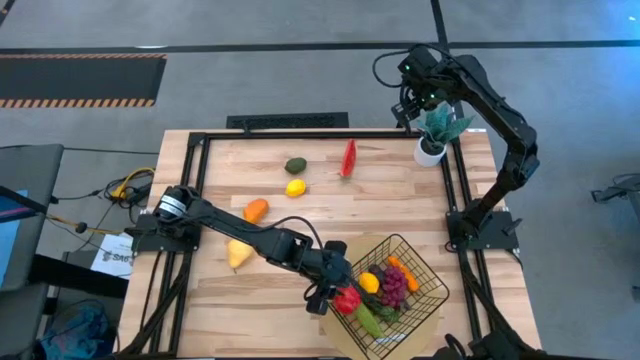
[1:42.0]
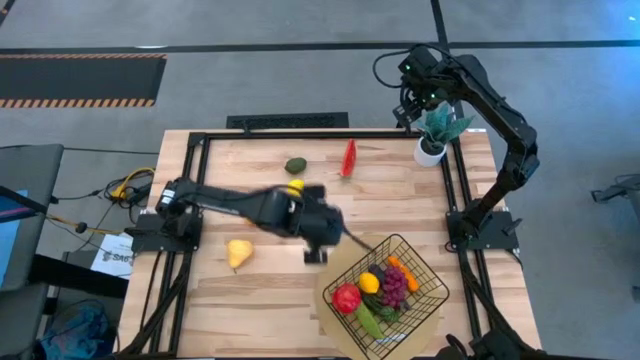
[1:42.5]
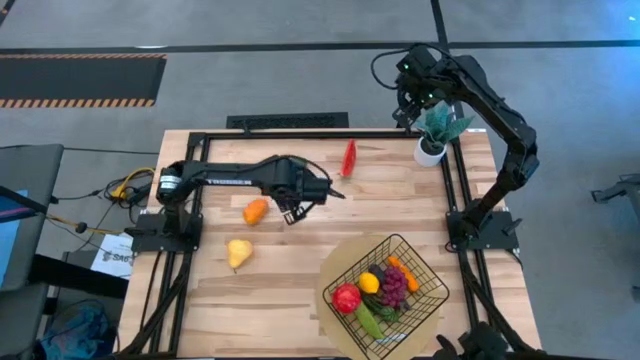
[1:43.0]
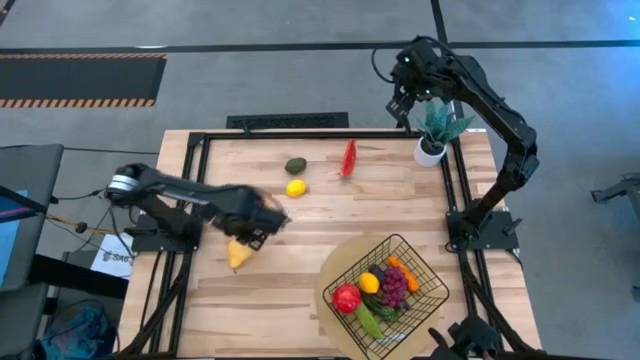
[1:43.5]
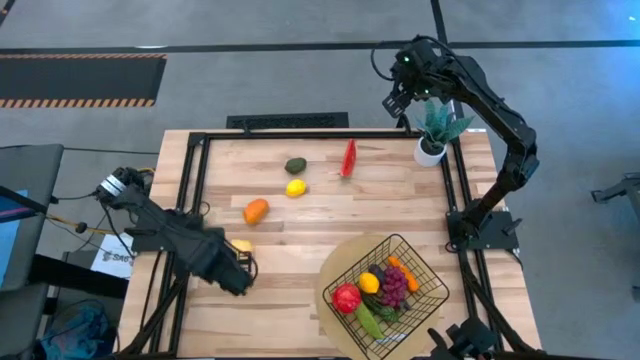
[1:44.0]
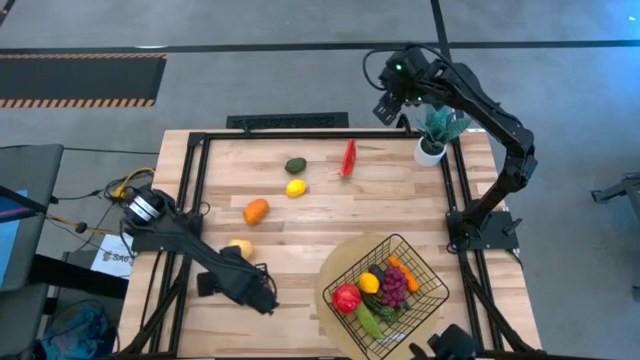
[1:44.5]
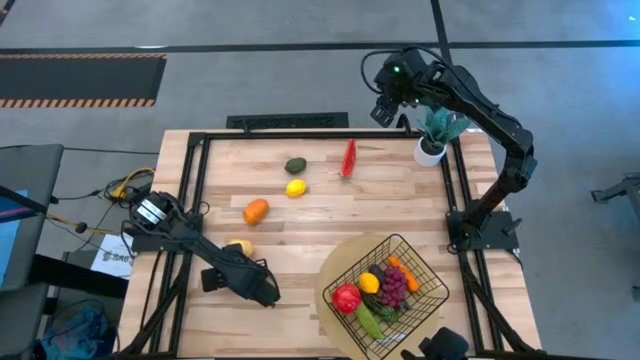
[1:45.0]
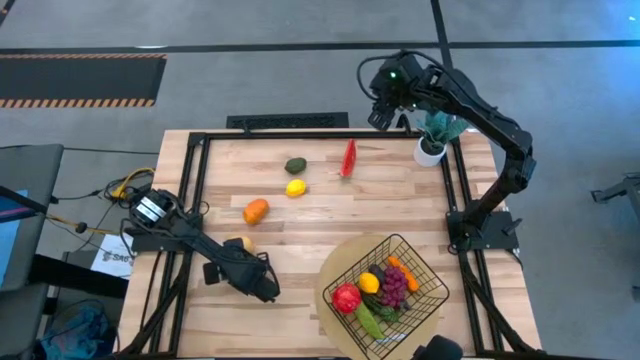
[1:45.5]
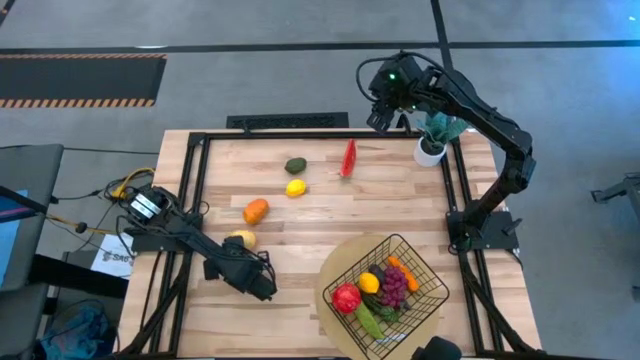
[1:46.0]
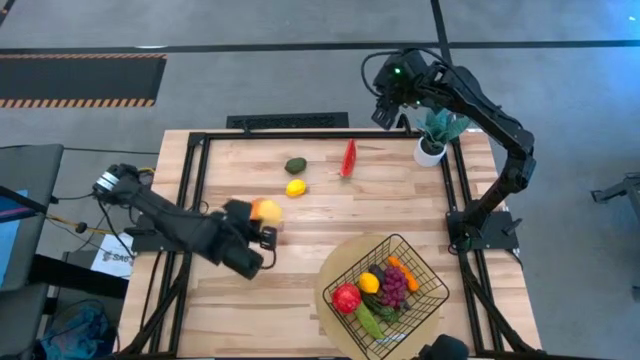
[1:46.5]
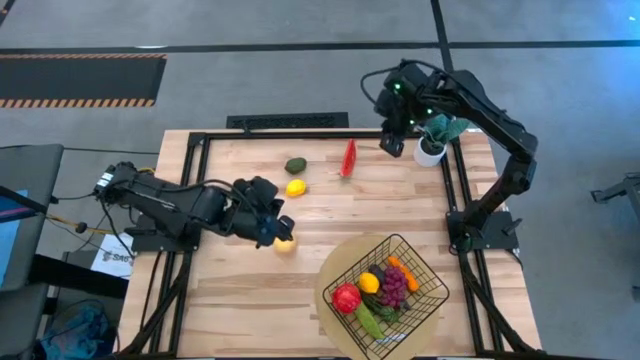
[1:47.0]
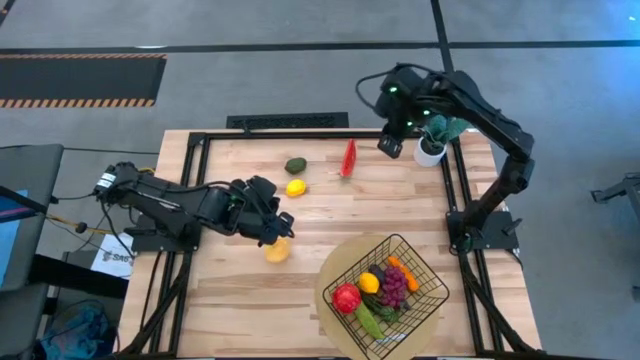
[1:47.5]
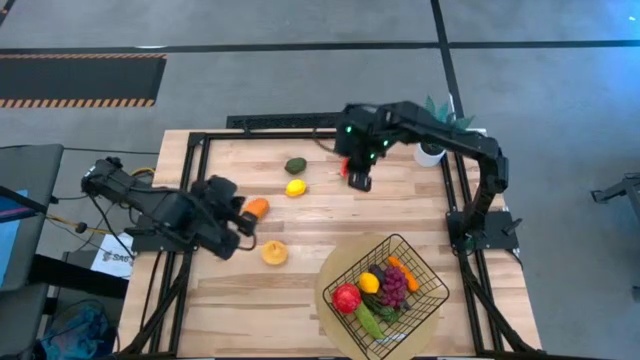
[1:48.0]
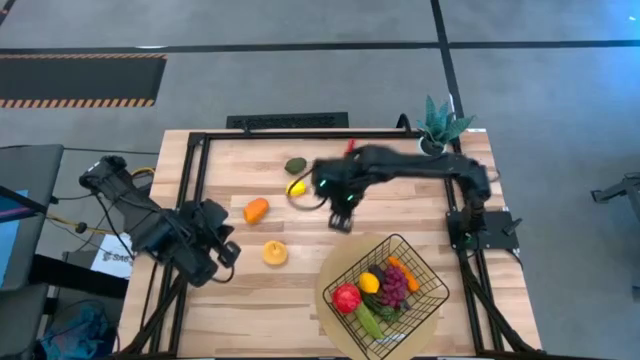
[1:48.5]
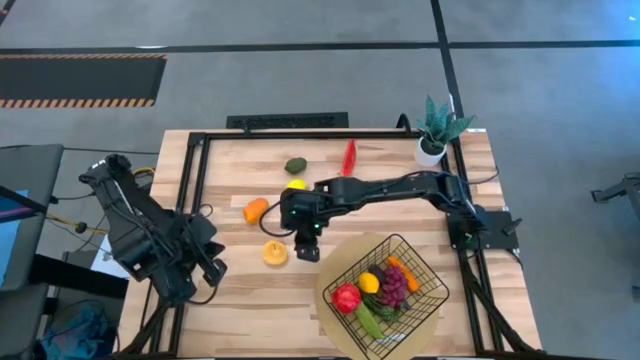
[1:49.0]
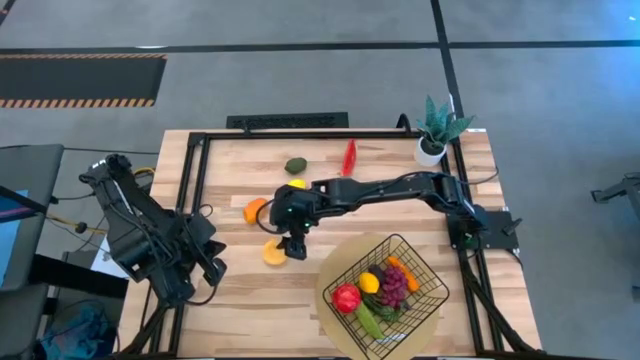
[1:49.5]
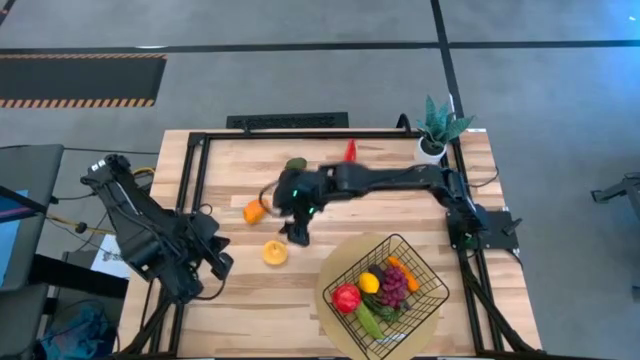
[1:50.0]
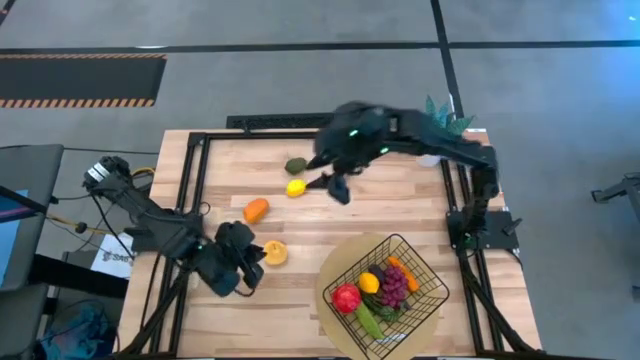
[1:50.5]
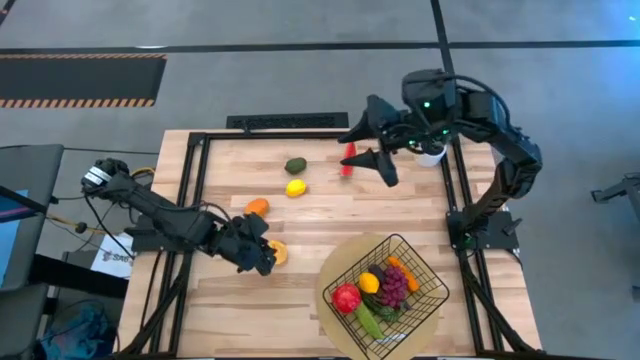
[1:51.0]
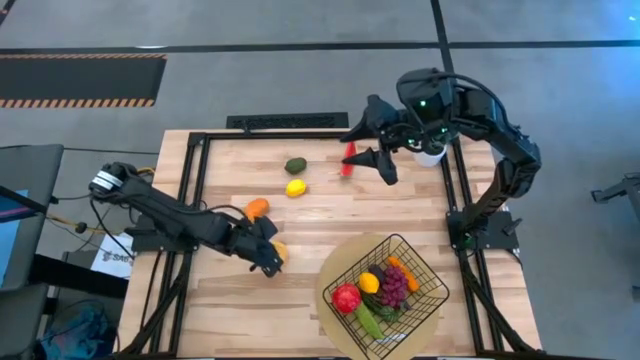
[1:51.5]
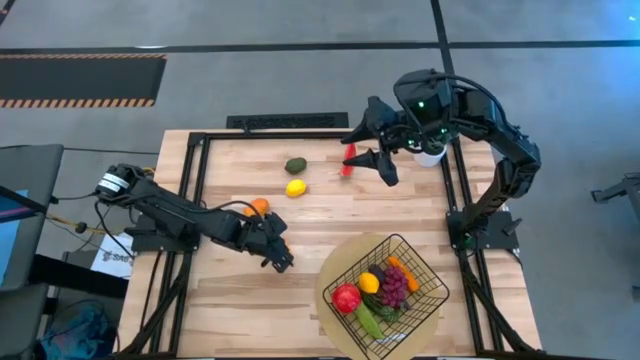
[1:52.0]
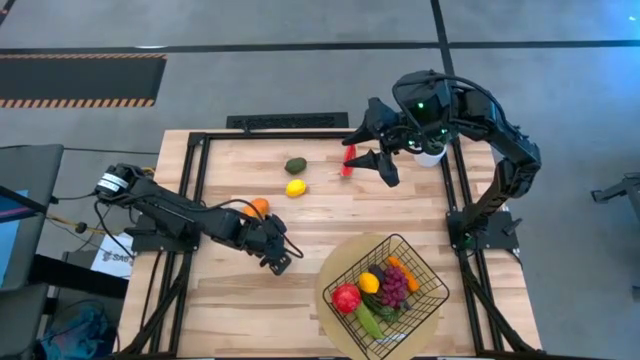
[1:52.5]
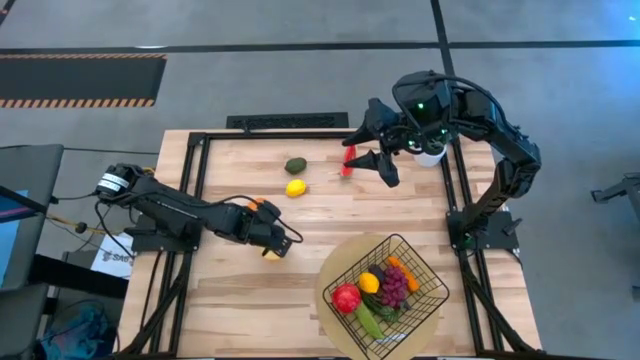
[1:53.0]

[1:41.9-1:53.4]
Task: Build produce basket
Put the pear into the mesh basket

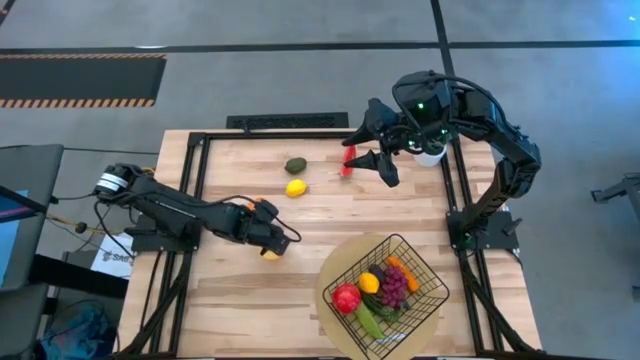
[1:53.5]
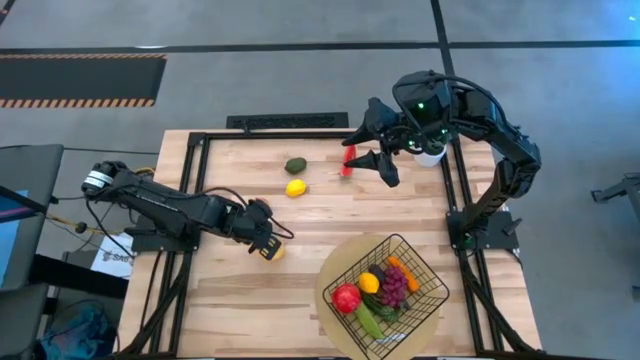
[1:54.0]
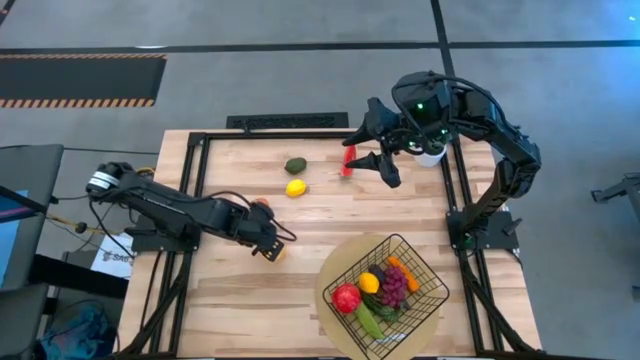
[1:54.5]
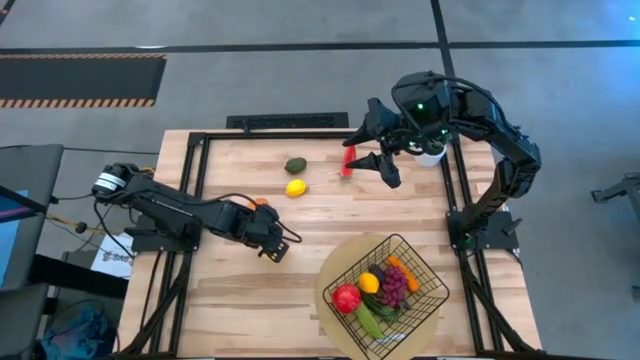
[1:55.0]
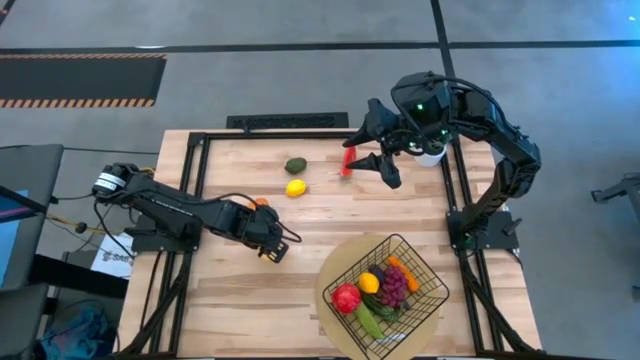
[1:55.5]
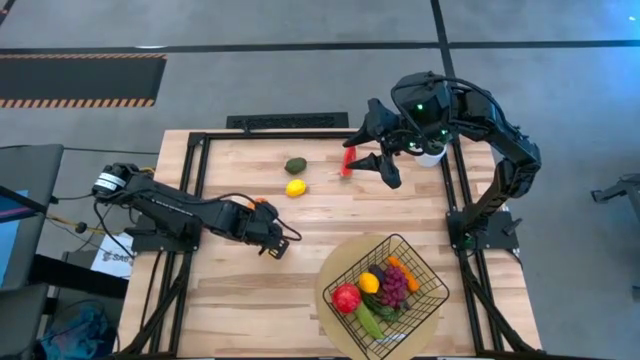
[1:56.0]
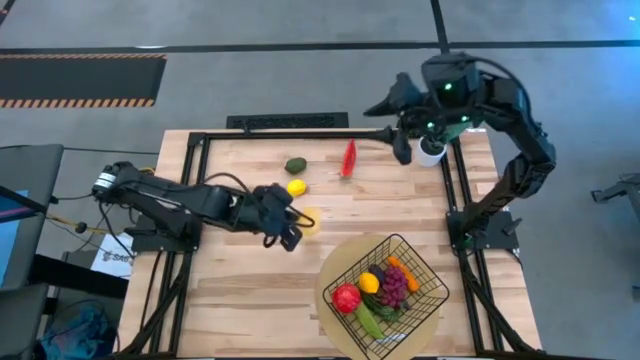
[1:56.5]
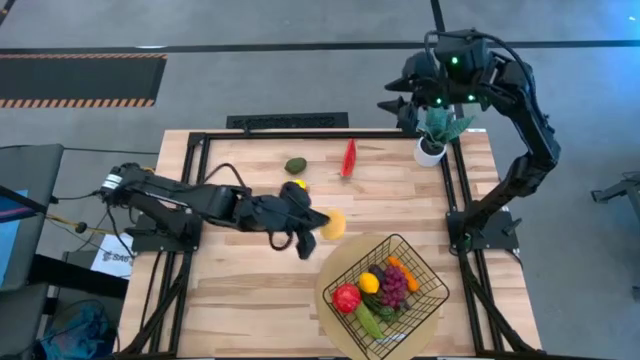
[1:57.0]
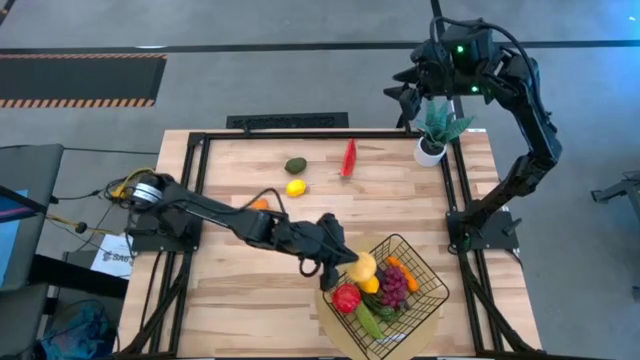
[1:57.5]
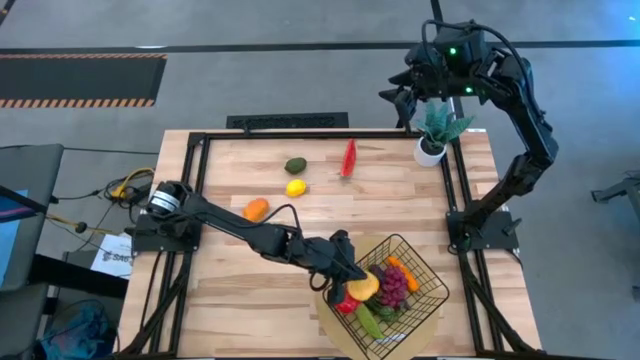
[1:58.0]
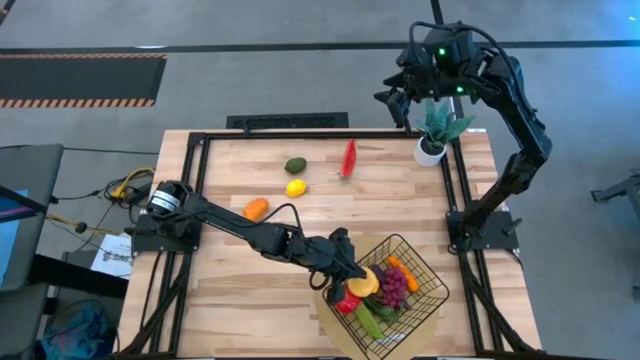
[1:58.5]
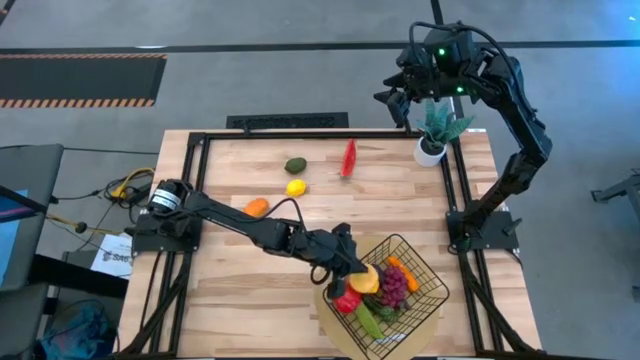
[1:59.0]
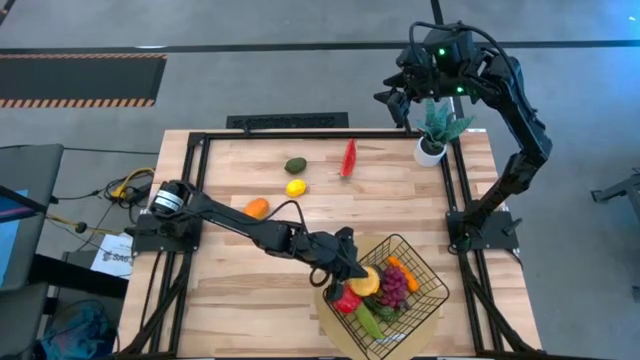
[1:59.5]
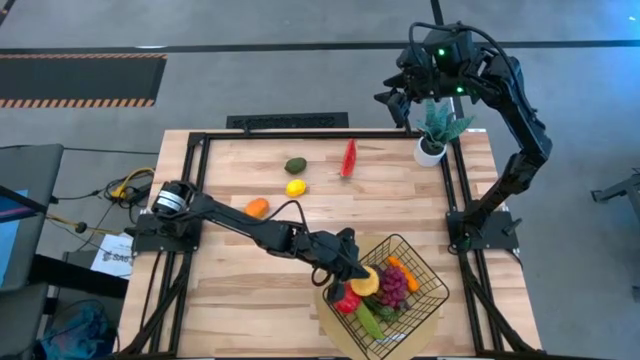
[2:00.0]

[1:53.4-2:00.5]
Put the pear into the mesh basket
